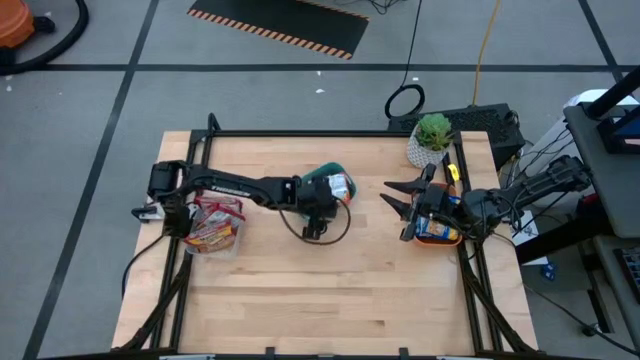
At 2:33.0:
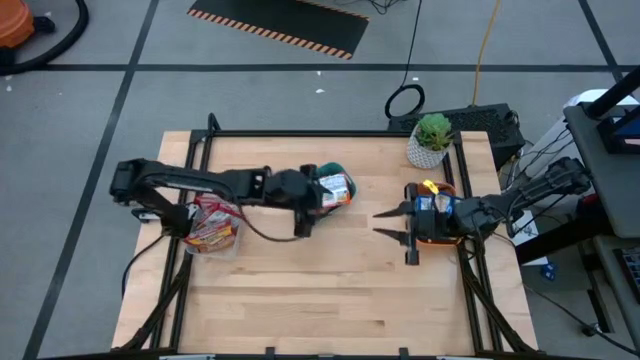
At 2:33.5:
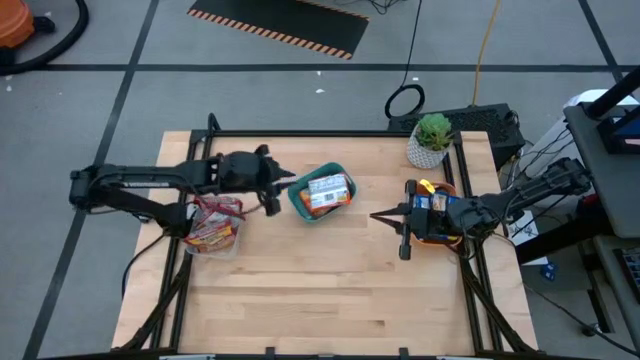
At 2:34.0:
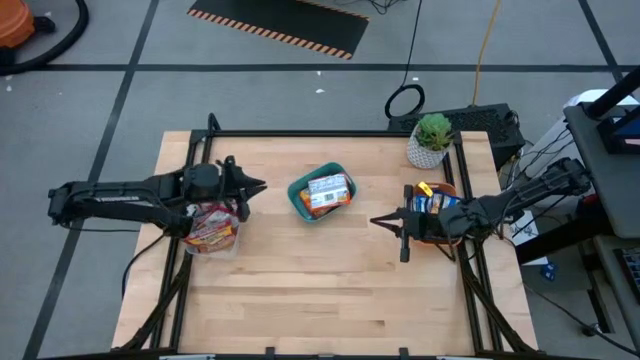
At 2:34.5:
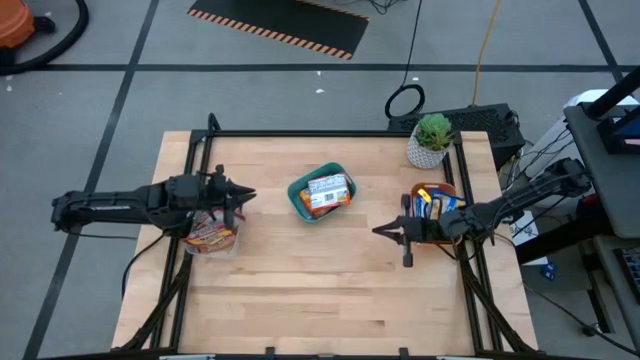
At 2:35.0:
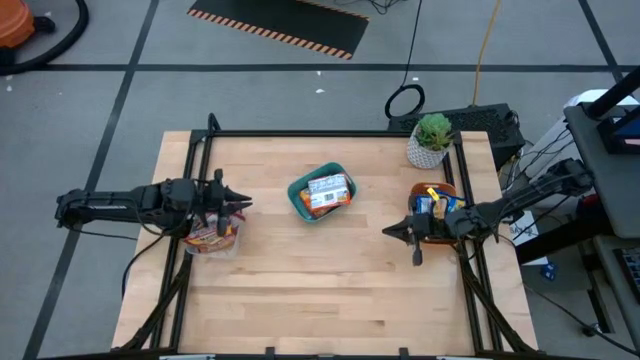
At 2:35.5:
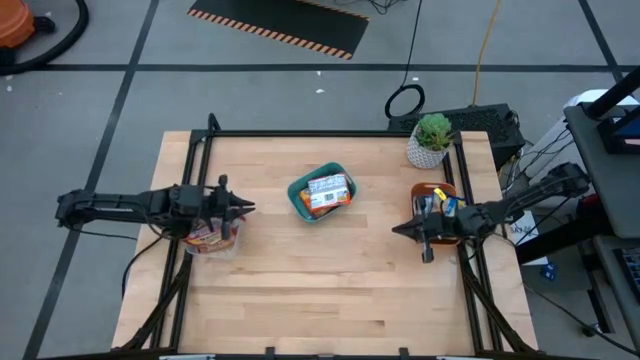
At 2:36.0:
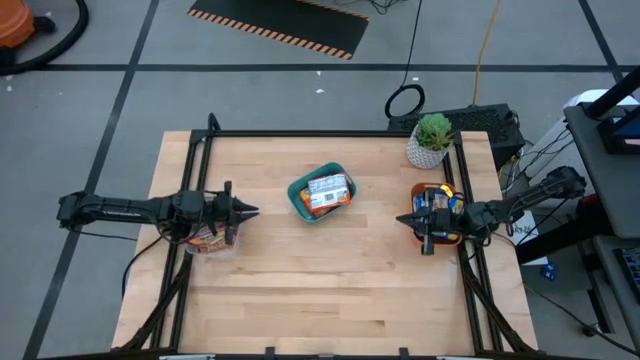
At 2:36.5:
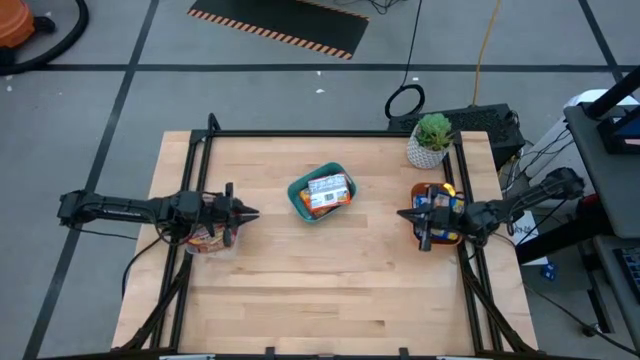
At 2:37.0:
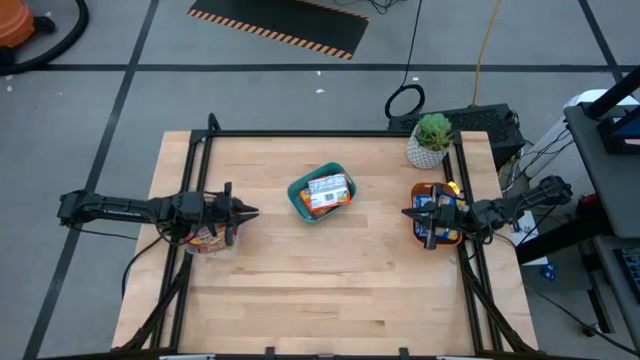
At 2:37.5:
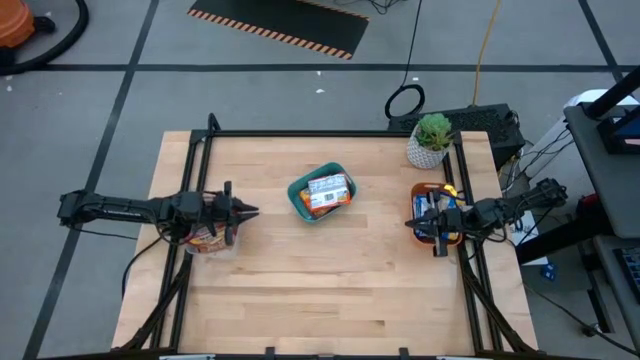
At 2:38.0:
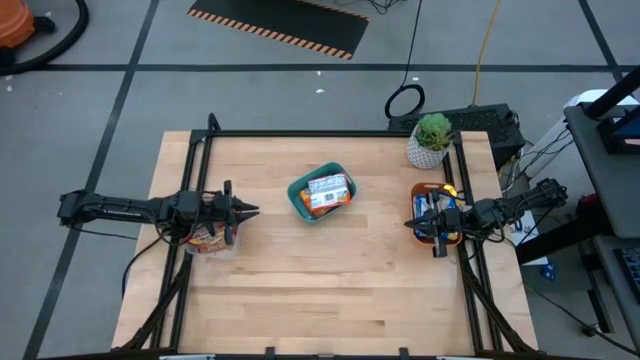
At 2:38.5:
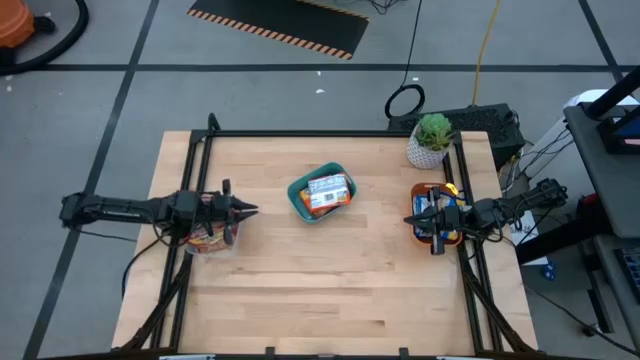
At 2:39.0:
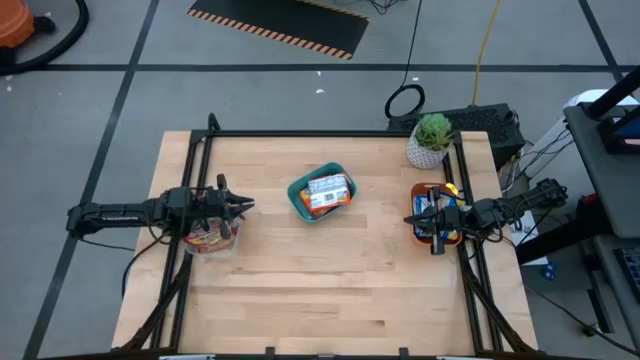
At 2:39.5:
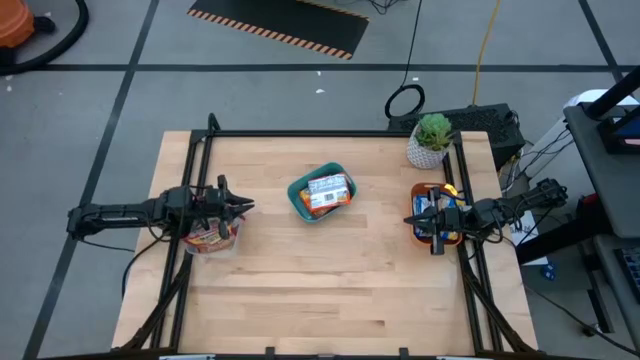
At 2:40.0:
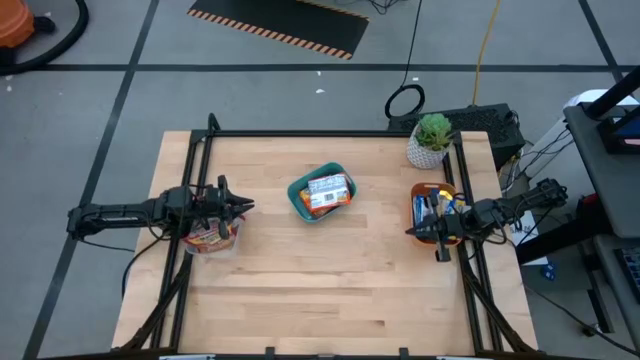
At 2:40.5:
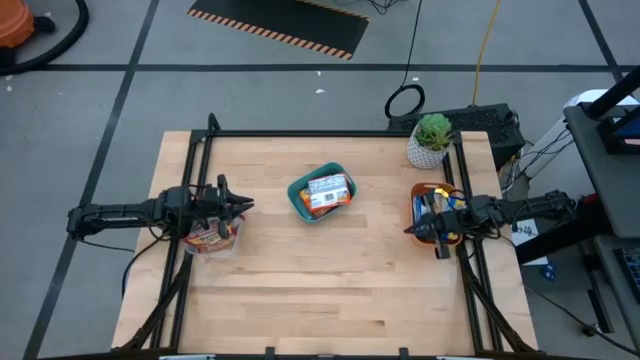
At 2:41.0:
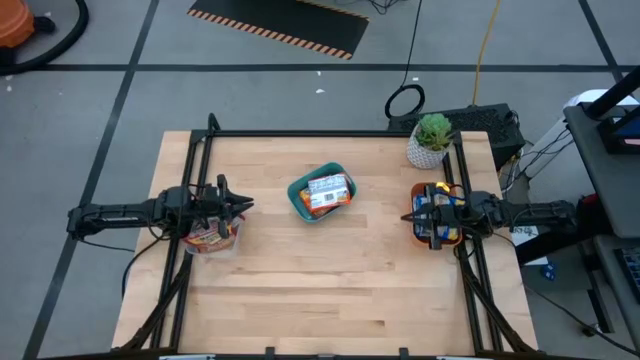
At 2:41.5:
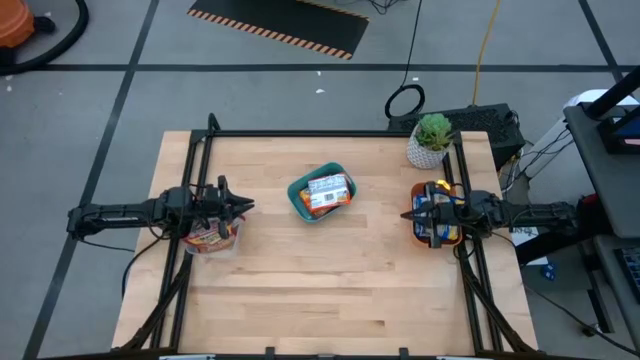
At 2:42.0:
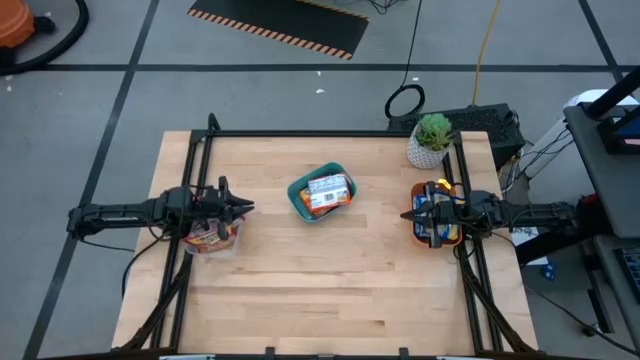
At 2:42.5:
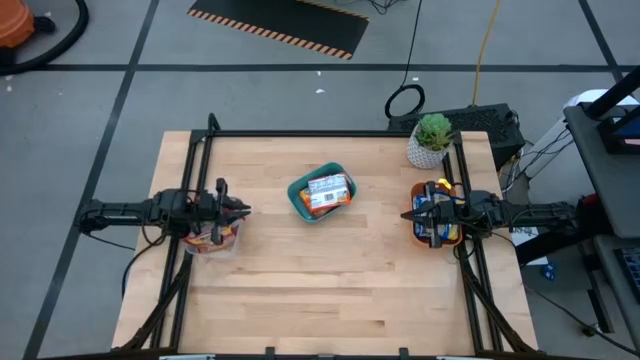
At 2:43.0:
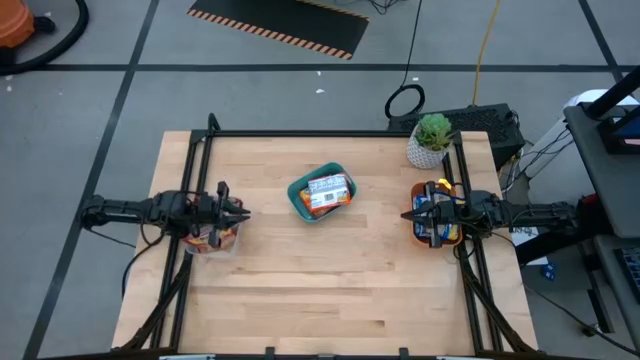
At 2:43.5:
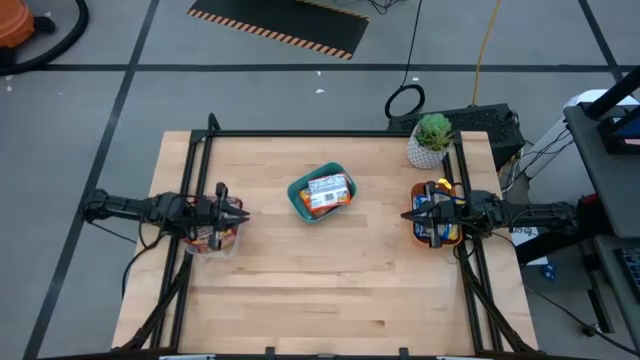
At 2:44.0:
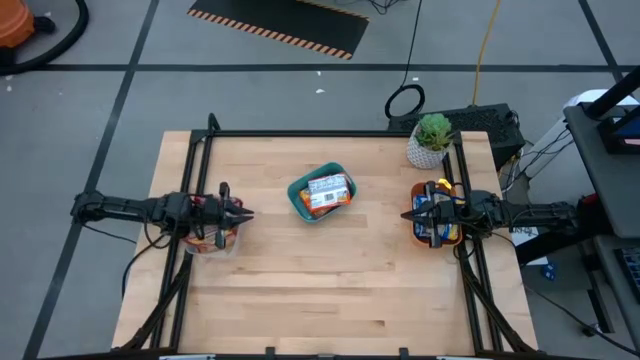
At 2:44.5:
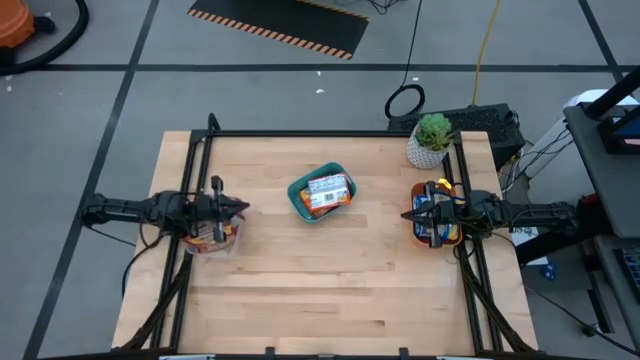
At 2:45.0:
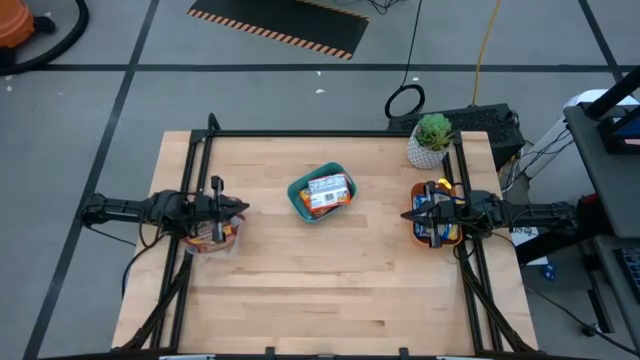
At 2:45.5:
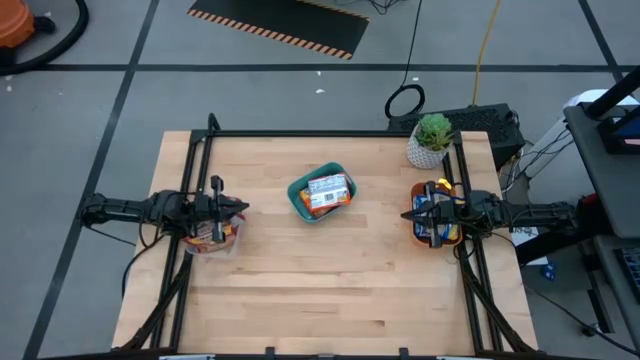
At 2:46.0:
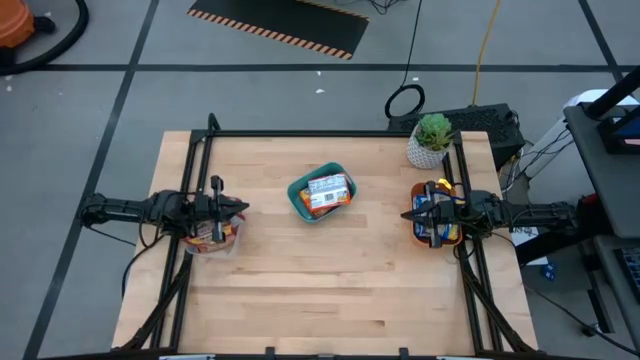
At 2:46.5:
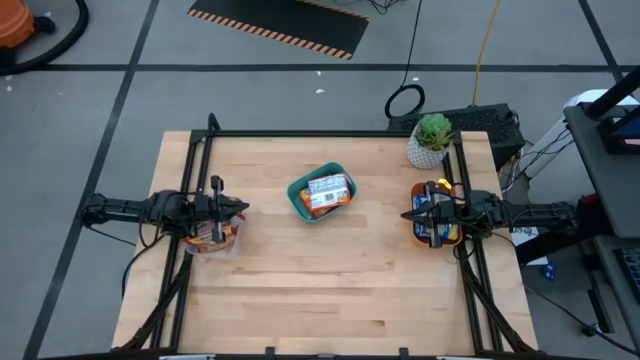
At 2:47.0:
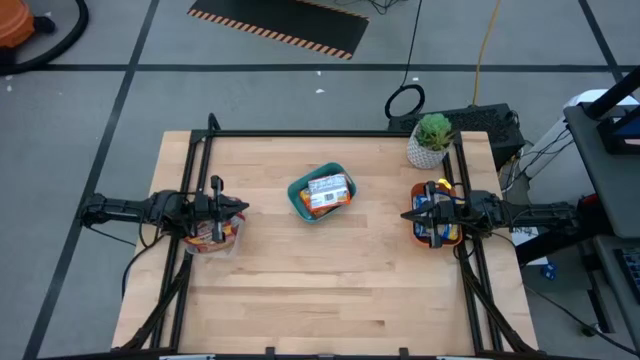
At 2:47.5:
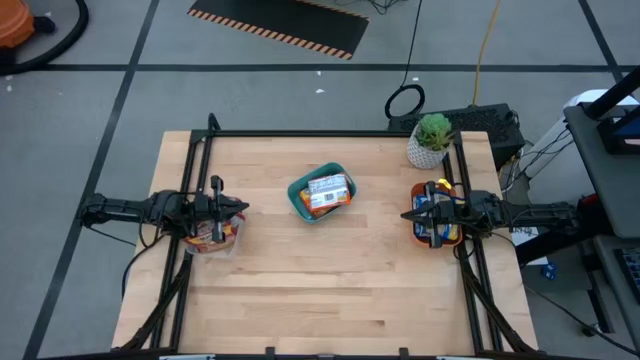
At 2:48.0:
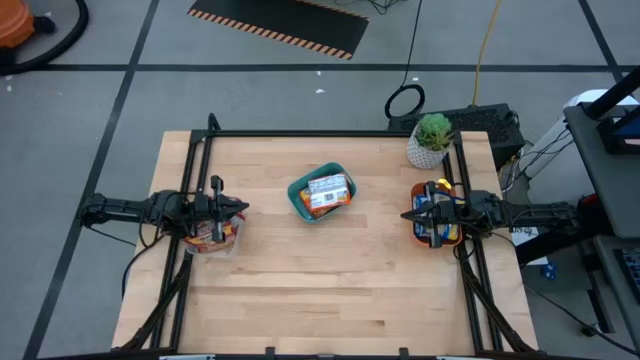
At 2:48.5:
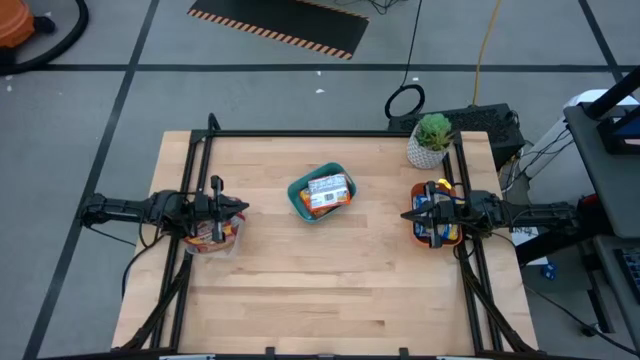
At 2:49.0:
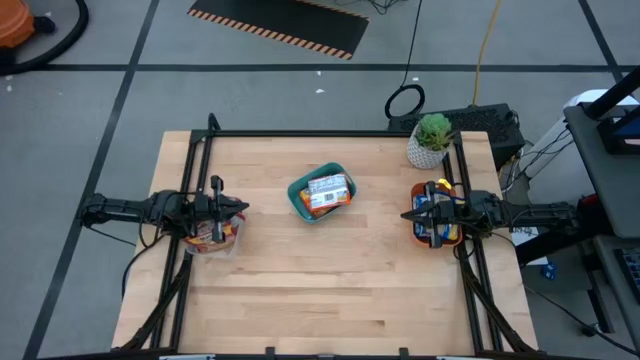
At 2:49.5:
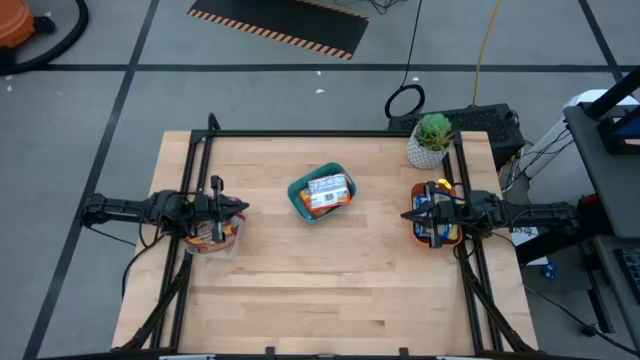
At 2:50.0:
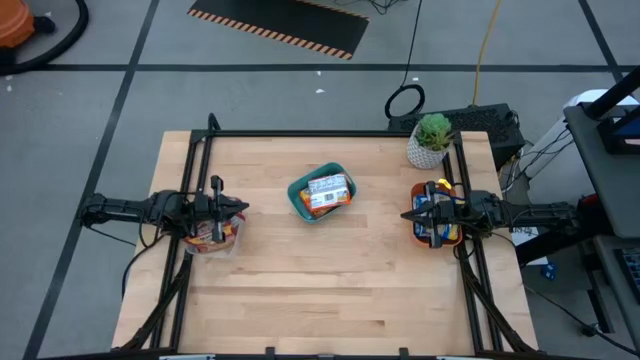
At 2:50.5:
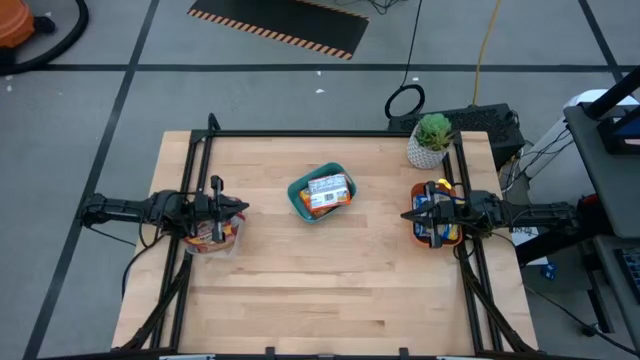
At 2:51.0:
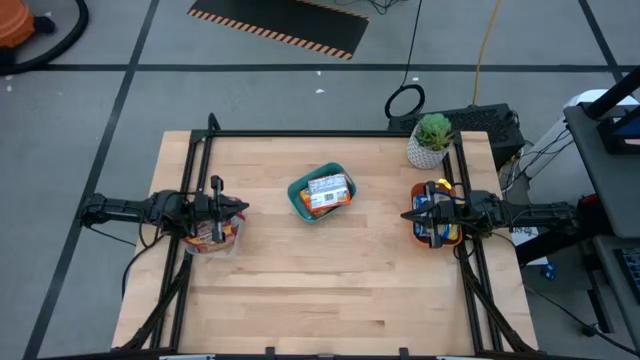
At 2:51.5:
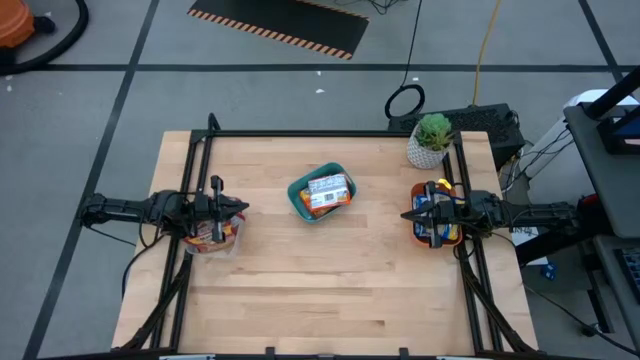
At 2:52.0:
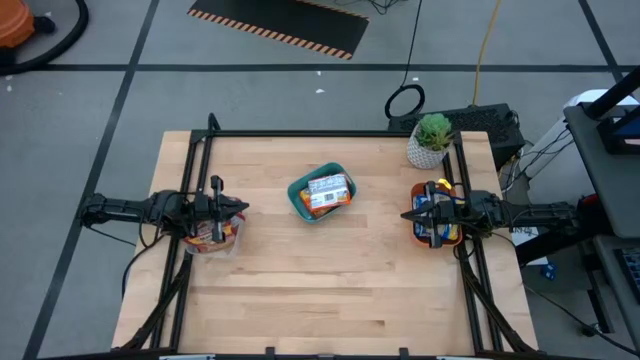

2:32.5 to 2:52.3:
Task: Sort Maruchan noodles
Return to Home Position

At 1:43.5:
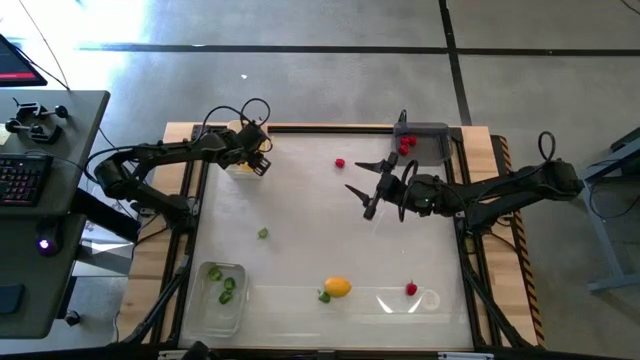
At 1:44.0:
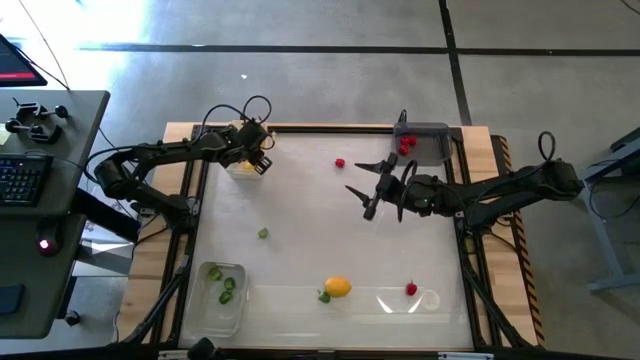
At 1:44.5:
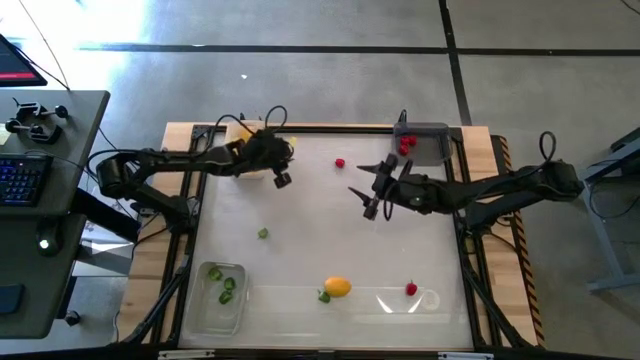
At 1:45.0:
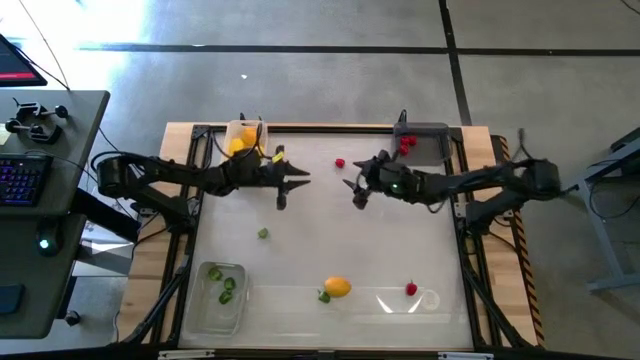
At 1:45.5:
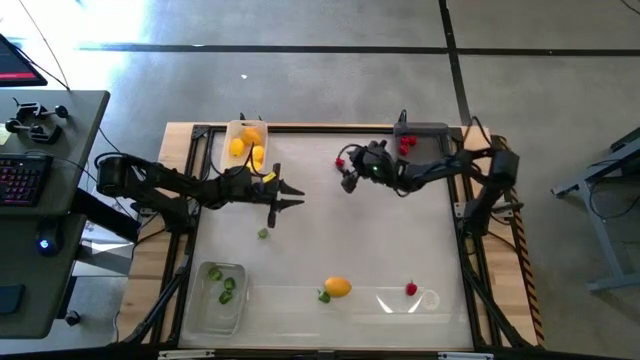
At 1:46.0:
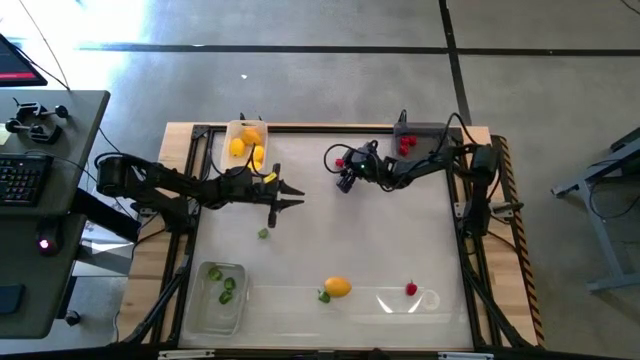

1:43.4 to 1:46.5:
Task: Sort produce into baskets
Put the red bell pepper into the black bin
